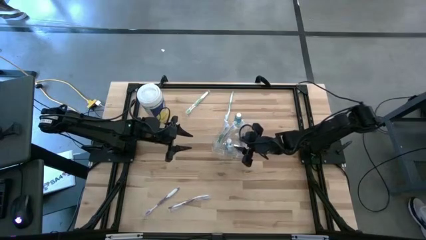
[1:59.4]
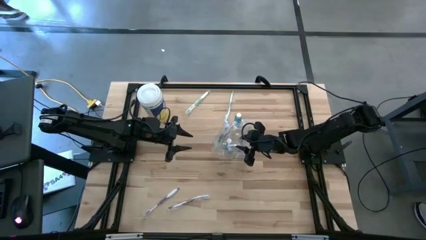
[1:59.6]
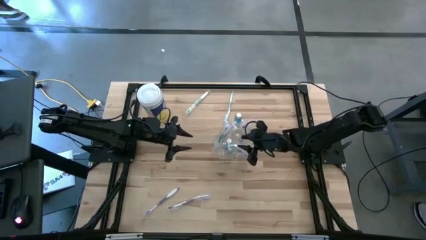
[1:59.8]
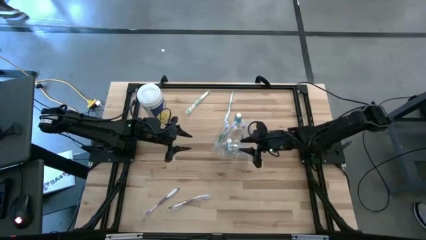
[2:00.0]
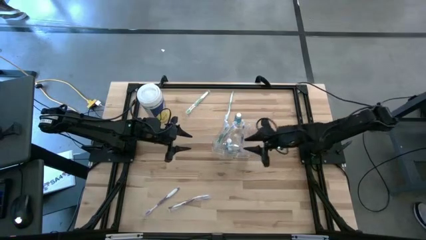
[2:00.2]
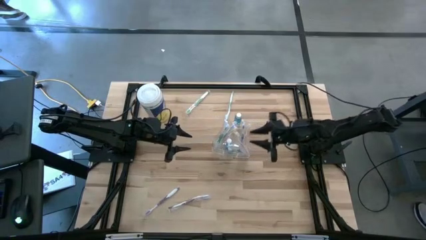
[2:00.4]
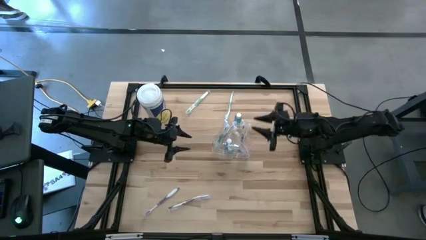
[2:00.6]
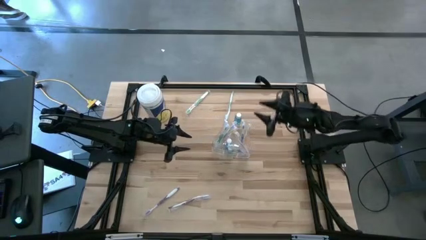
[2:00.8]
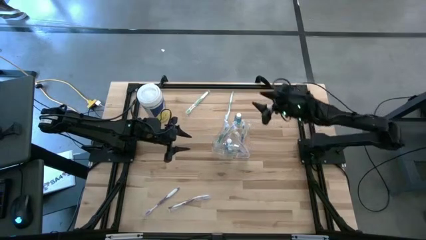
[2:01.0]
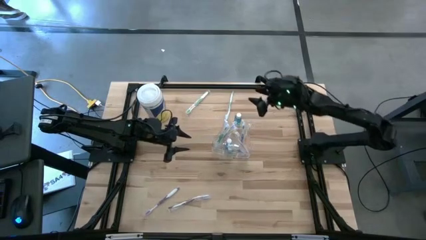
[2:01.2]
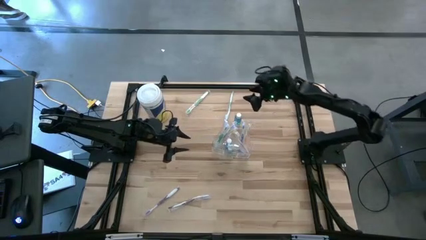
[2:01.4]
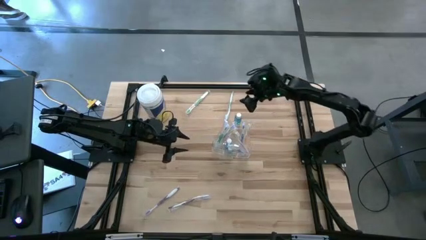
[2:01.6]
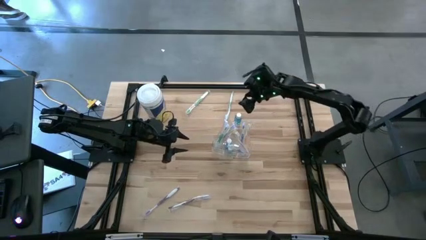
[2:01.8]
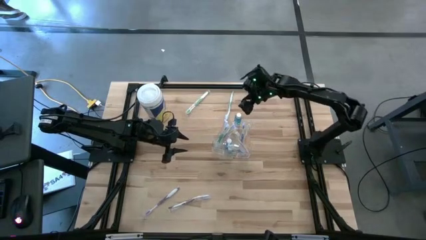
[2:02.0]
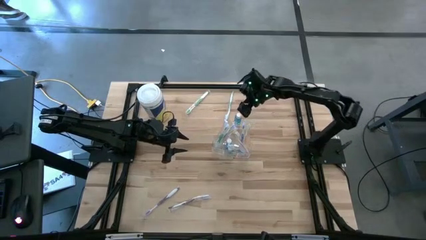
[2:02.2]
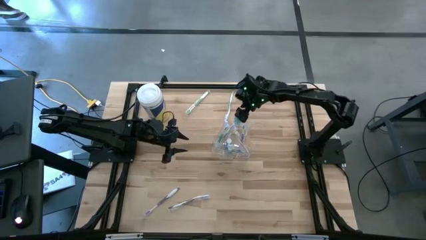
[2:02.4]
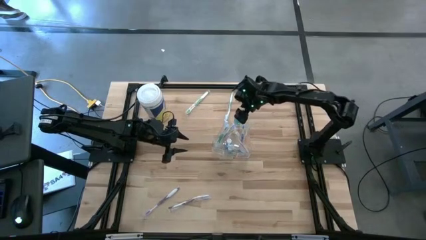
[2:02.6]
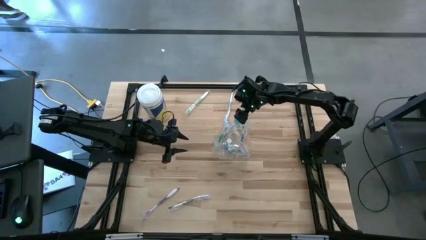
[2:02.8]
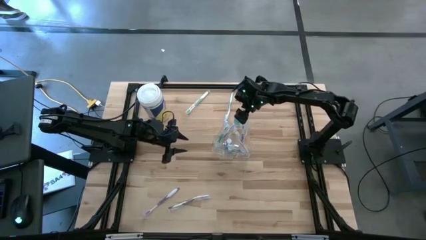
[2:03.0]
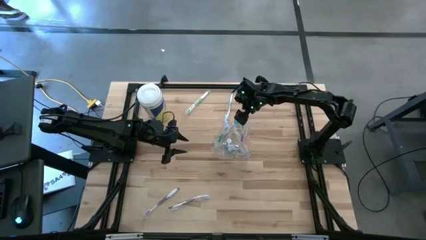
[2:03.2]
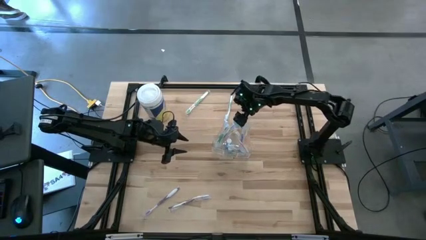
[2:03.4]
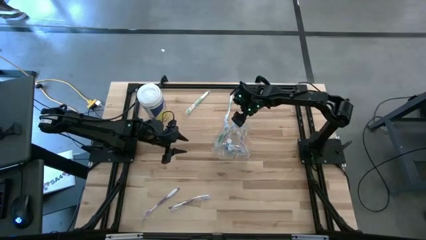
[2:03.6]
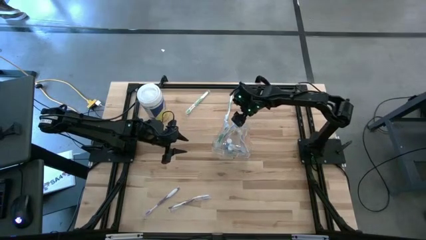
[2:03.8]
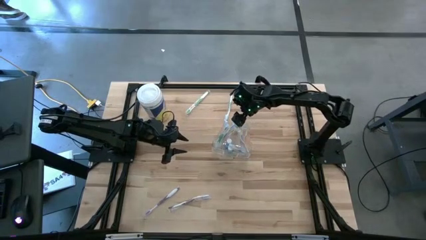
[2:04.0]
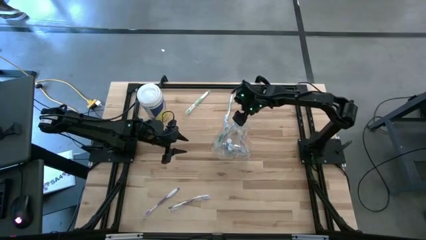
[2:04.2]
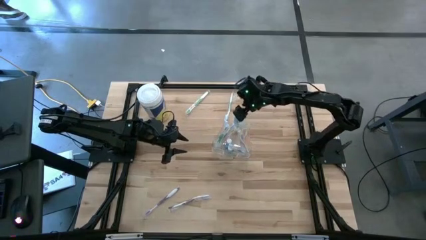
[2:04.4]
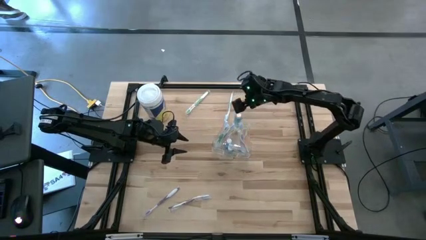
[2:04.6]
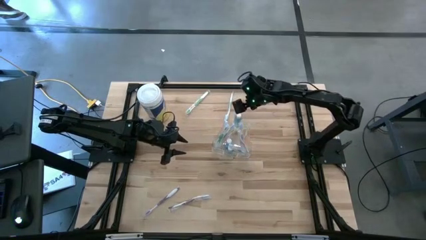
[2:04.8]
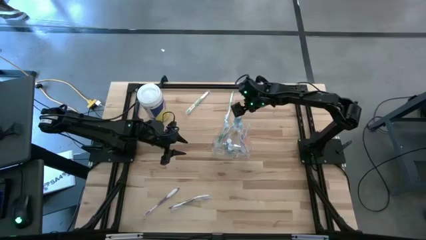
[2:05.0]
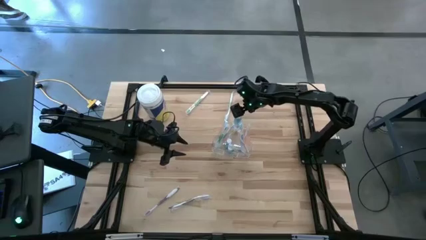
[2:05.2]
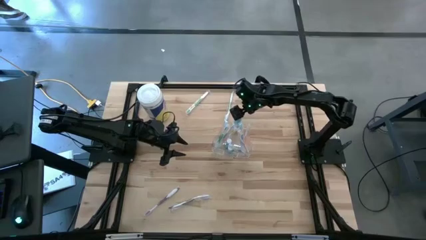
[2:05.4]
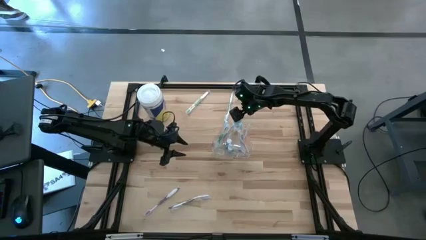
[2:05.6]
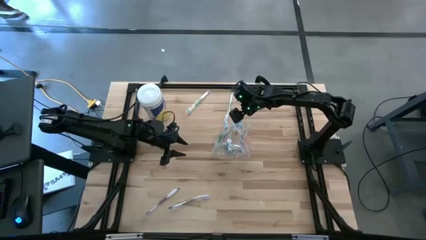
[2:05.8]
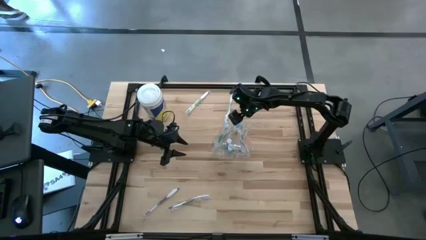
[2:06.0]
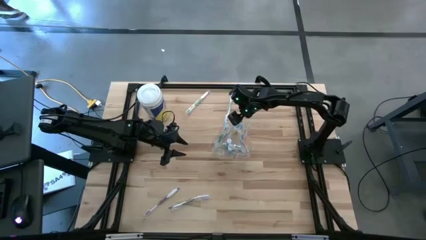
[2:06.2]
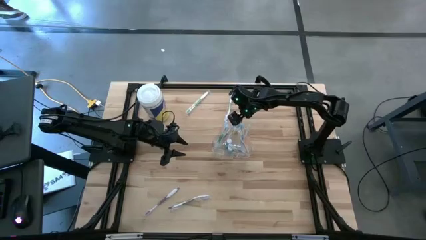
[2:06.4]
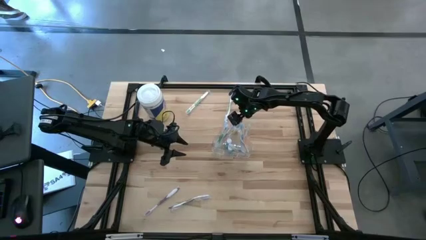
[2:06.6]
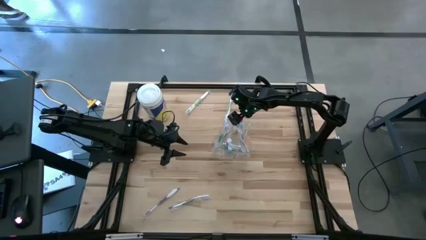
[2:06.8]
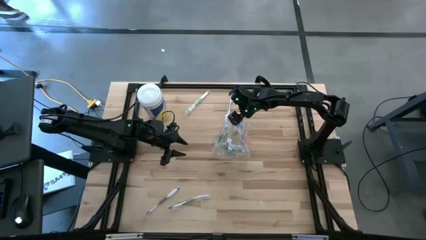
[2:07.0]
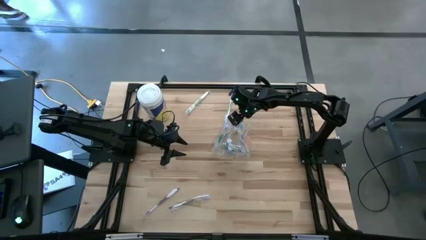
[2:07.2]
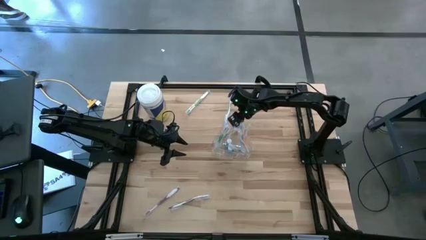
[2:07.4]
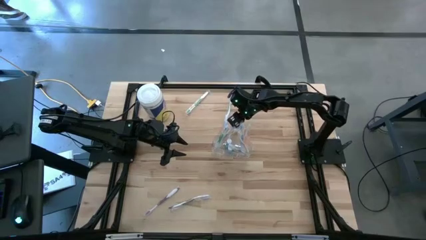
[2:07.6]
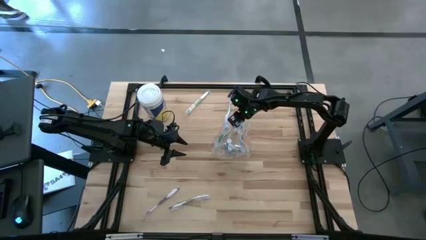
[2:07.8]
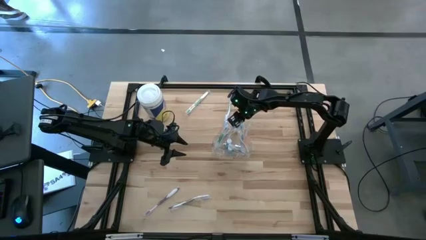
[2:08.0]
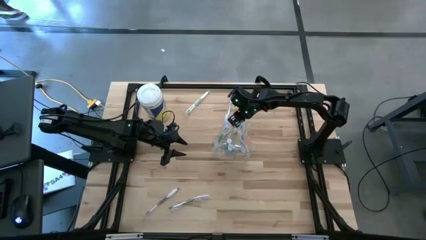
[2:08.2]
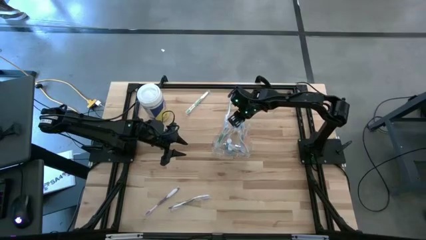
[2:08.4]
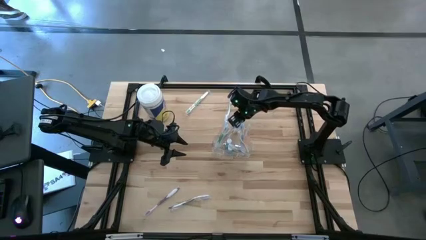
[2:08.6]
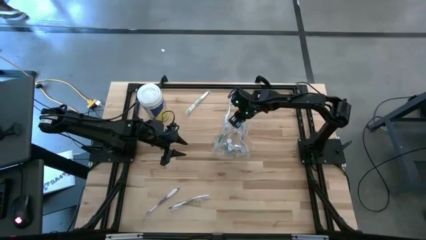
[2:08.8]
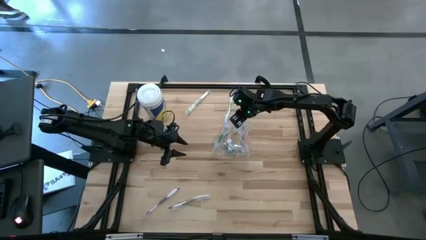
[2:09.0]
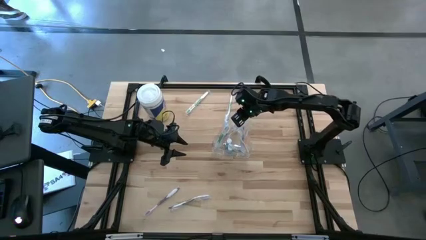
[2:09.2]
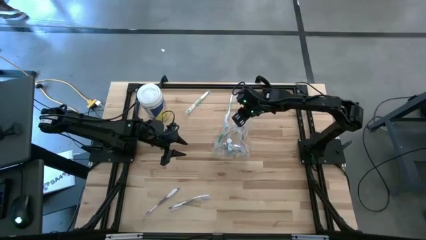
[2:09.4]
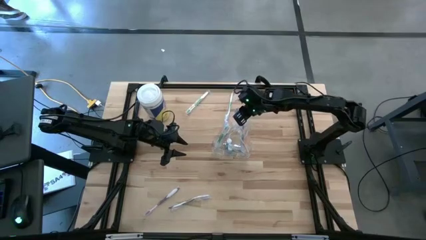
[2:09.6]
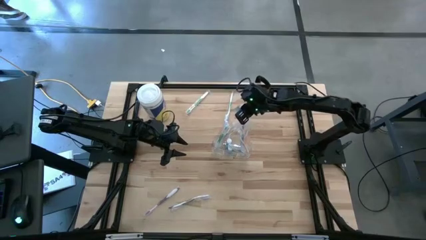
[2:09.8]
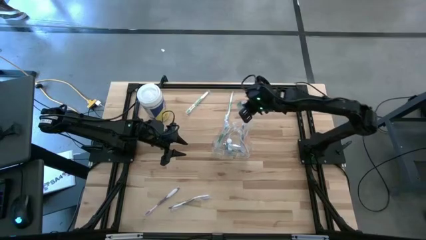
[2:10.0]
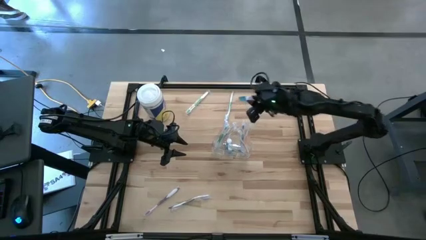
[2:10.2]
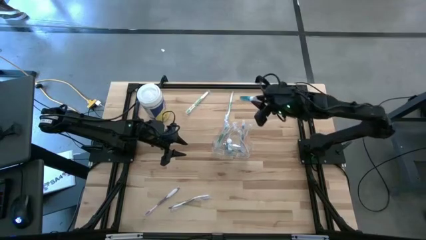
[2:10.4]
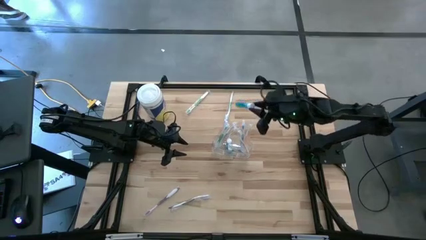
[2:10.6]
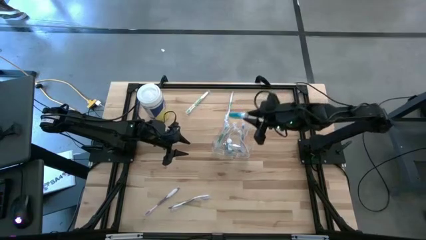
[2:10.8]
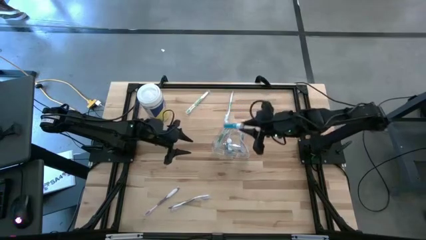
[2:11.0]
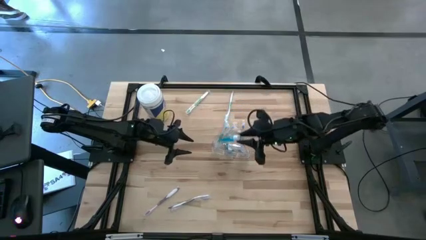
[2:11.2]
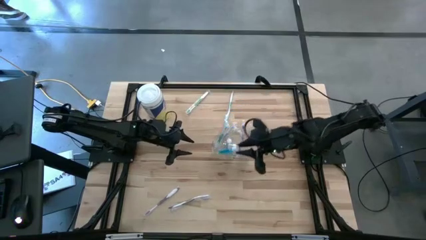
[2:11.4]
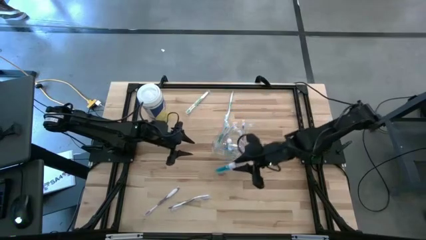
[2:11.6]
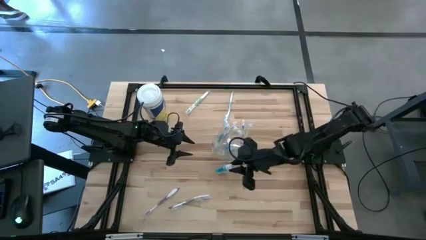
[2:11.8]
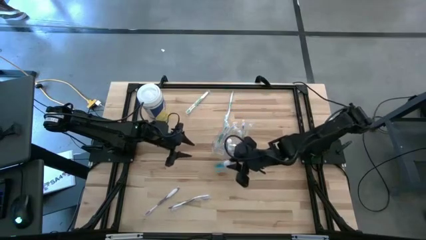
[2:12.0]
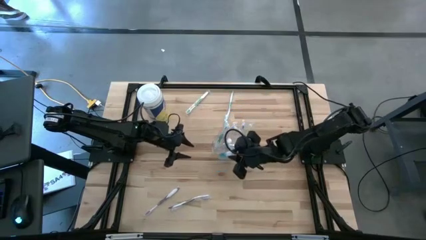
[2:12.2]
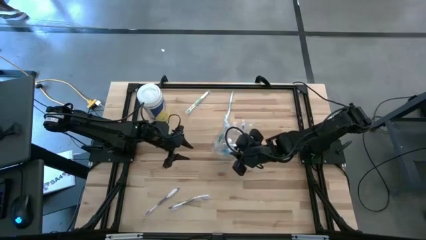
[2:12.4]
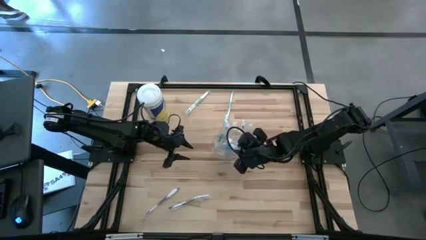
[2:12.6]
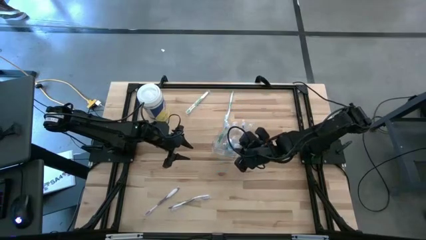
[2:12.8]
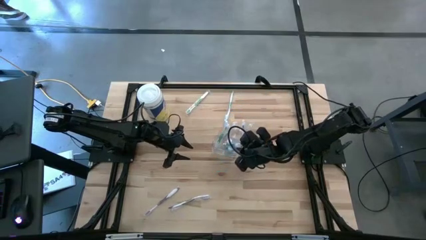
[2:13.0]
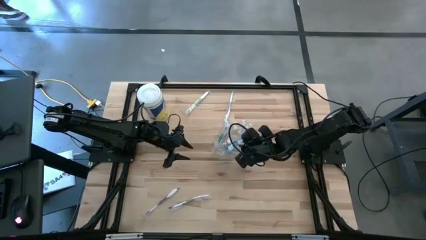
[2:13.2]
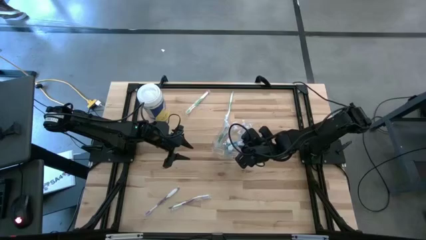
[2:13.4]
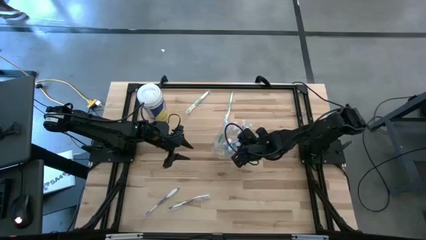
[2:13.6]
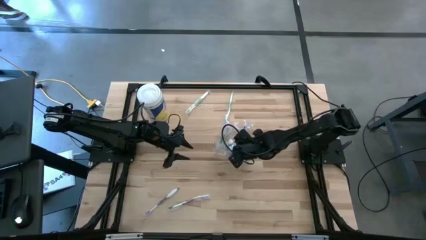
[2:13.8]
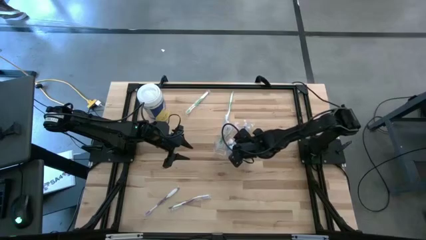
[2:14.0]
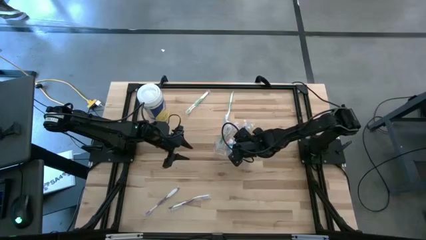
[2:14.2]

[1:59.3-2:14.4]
Task: Pick & Place toothbrushing station
Put the mouthwash into the middle section of the transparent organizer
